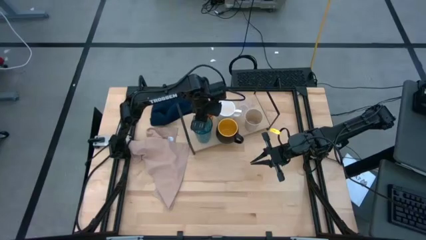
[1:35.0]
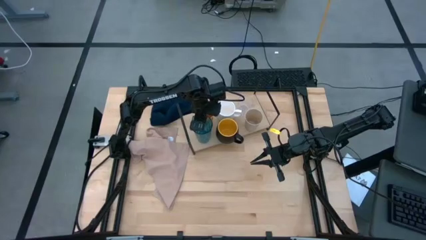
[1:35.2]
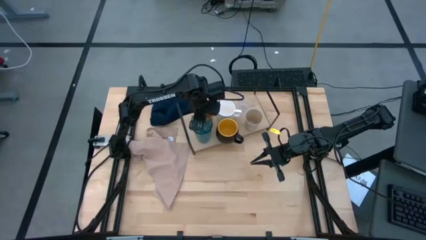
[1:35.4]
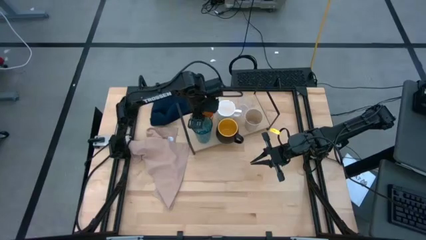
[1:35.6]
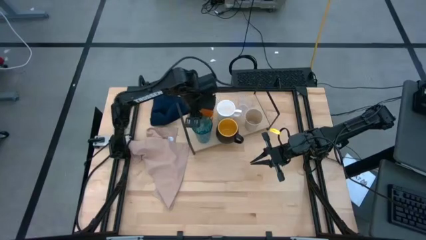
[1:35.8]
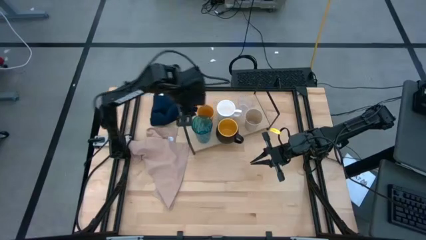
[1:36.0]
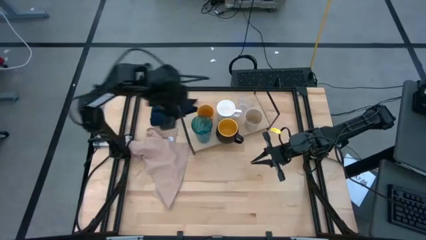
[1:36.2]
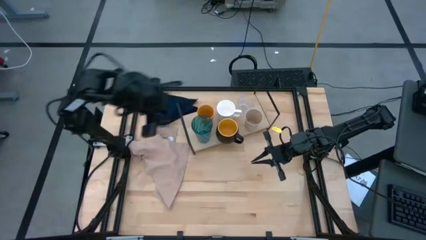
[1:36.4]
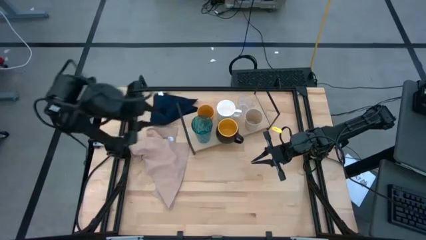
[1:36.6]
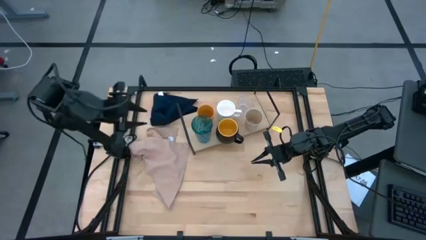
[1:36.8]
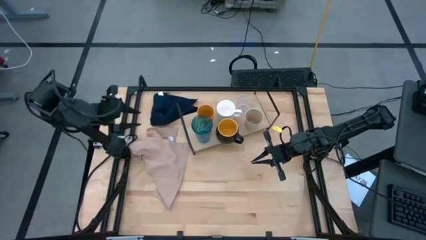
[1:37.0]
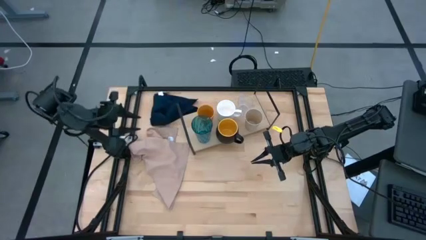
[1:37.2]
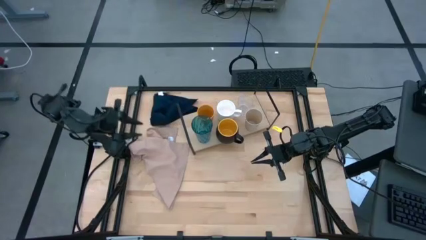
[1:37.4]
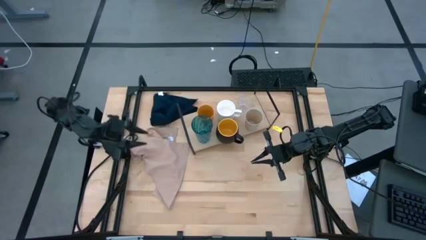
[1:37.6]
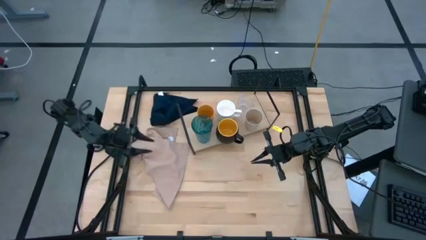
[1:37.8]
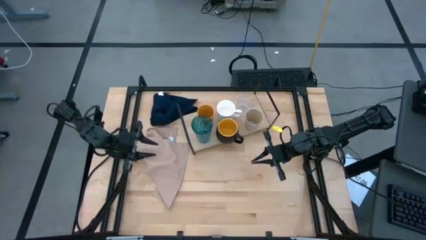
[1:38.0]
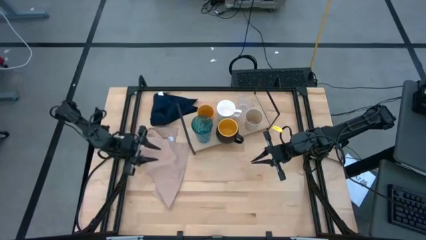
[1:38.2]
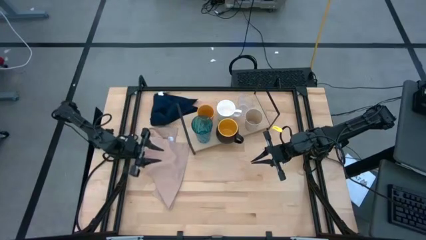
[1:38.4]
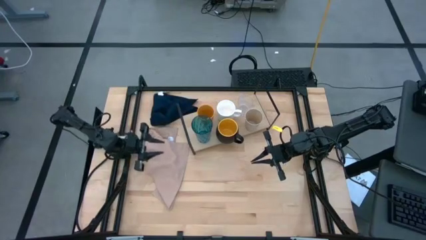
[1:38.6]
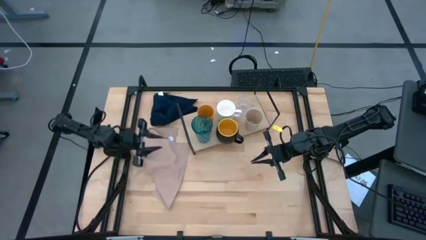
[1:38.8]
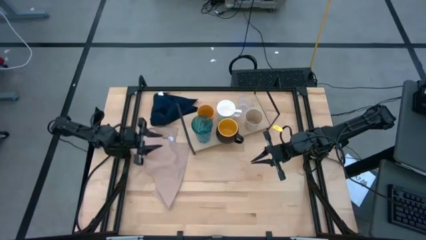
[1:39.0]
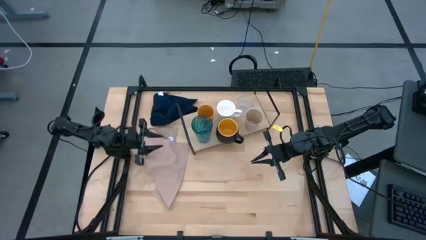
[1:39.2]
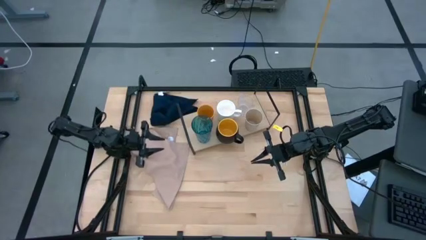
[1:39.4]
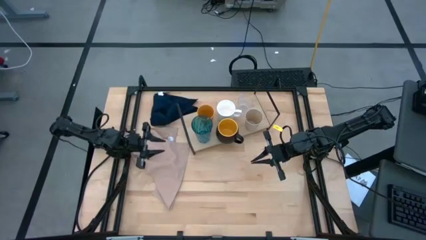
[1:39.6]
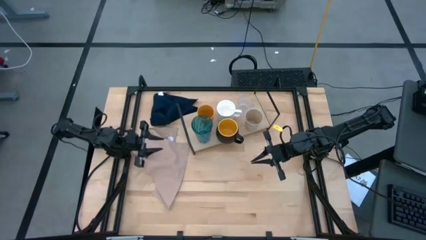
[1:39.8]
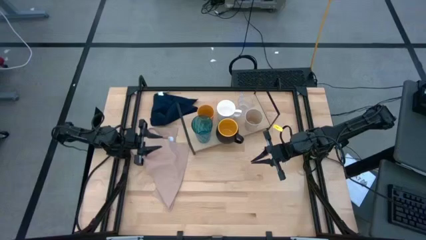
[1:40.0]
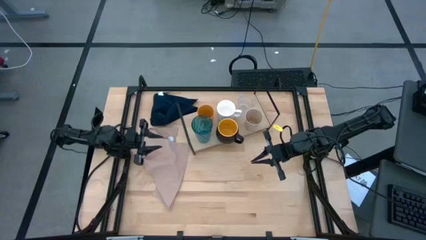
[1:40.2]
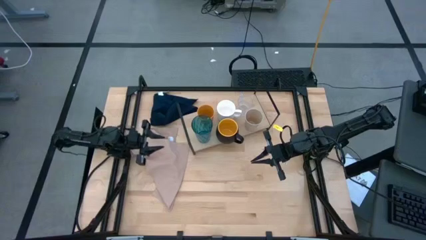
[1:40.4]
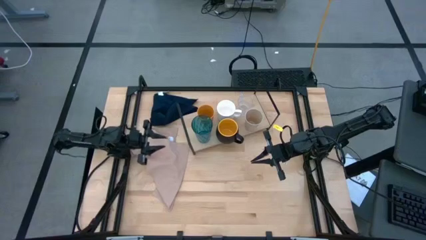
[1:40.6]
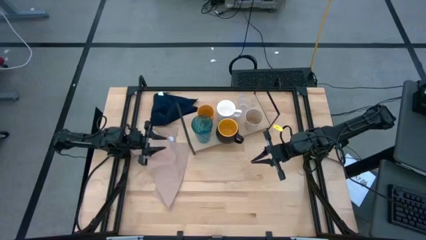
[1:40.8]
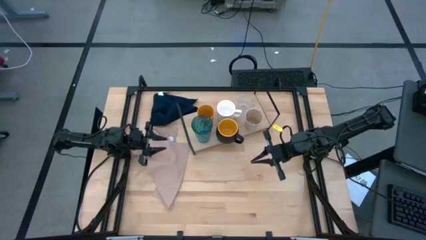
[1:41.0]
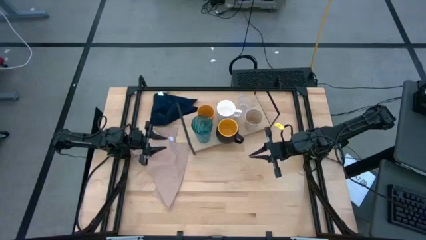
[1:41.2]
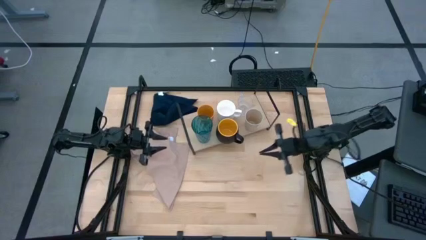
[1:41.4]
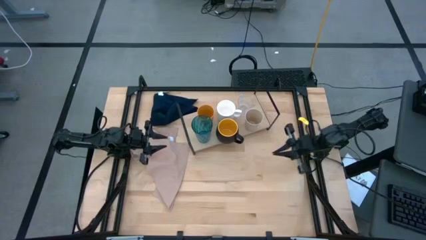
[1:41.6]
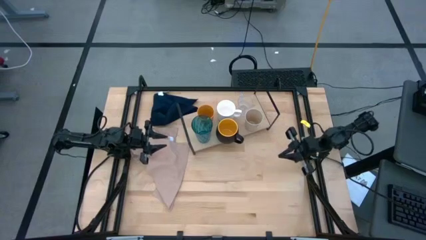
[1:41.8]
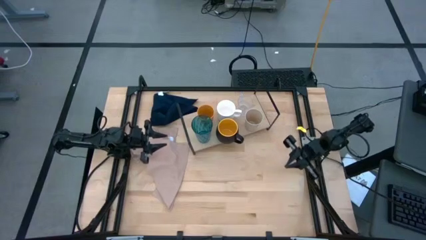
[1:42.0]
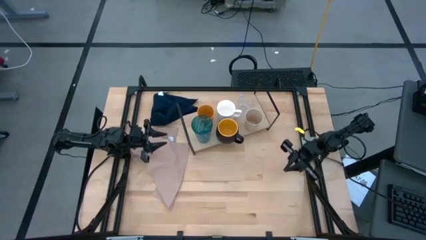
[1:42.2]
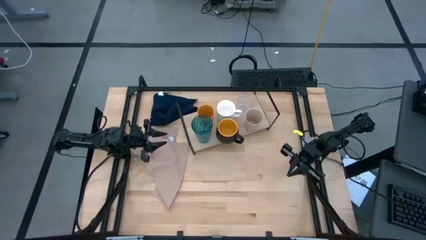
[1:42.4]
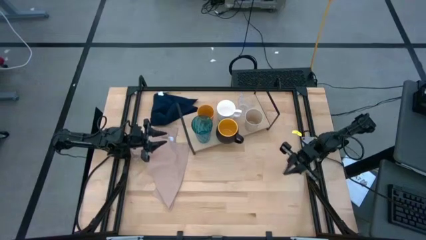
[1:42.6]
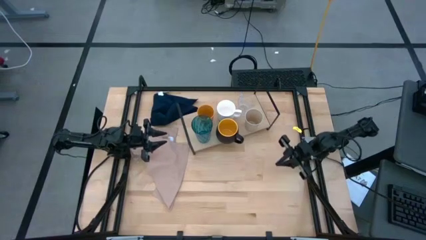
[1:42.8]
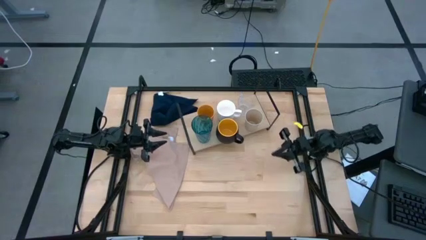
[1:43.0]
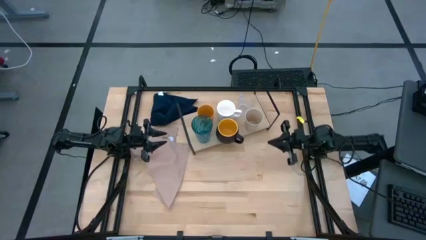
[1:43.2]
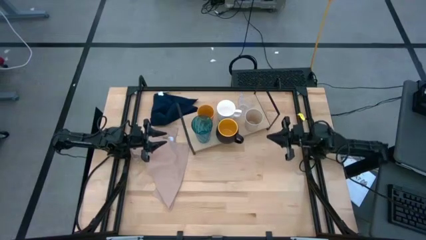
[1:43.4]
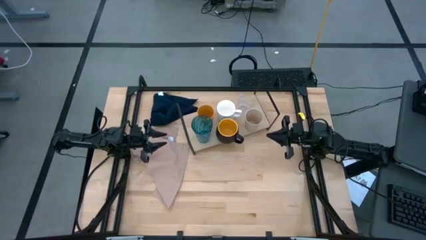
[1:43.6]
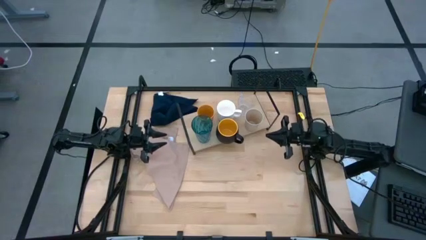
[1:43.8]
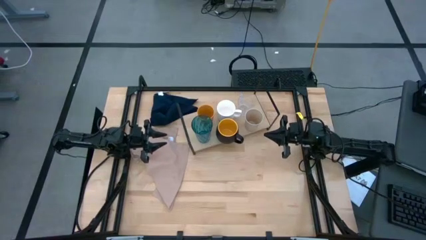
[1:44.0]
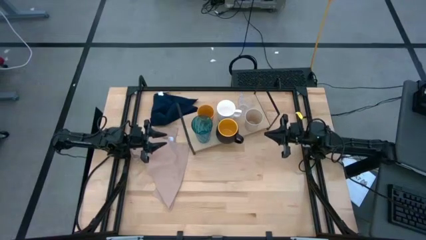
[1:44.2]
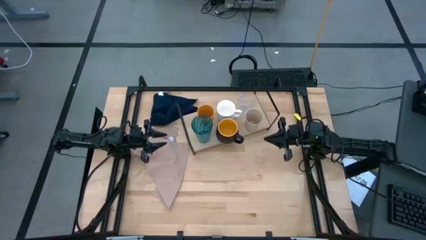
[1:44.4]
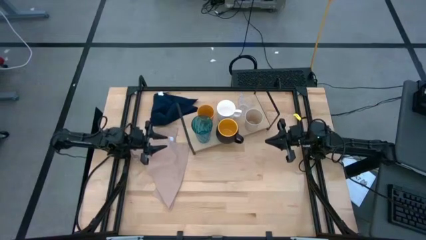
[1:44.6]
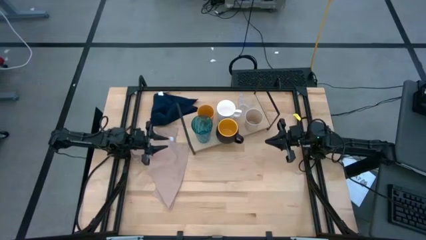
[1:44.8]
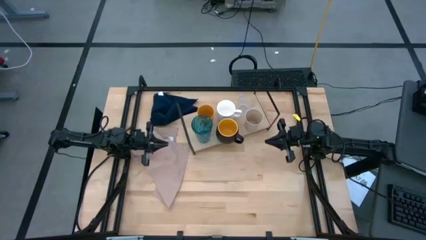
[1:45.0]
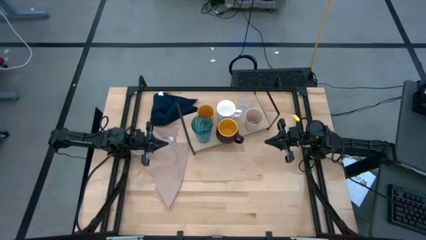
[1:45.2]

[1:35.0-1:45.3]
Task: Stack small to large cups/mugs on shelf
Return to Home Position
